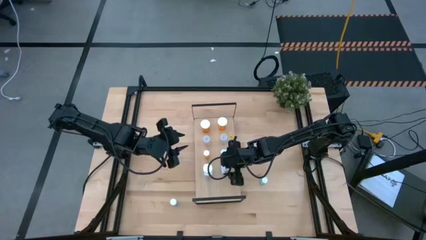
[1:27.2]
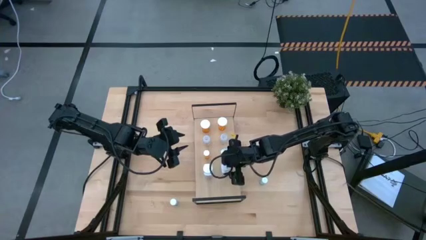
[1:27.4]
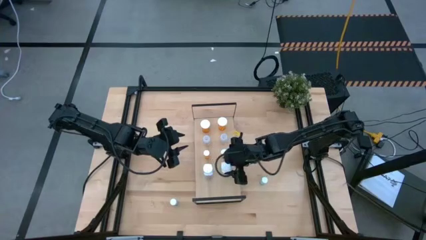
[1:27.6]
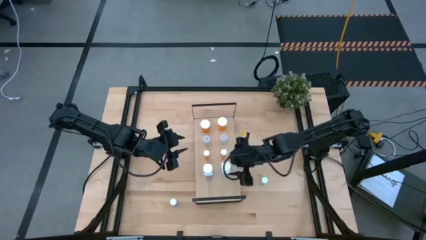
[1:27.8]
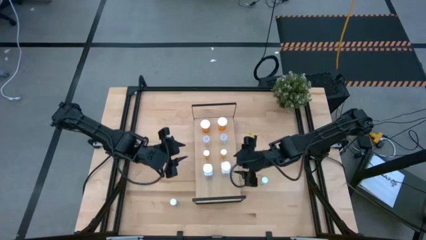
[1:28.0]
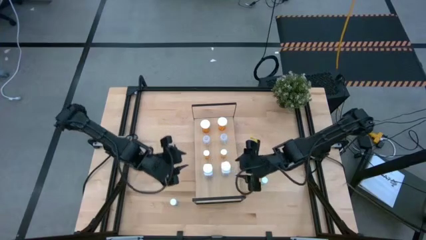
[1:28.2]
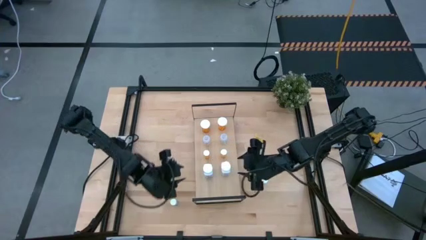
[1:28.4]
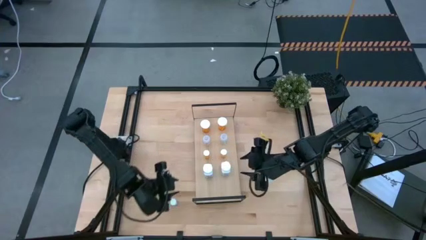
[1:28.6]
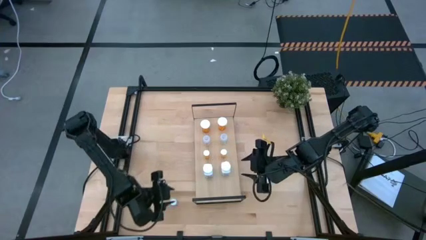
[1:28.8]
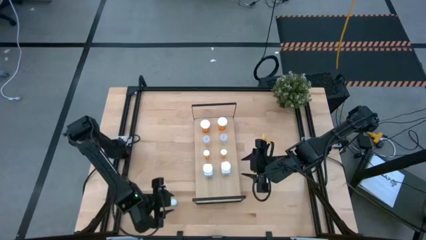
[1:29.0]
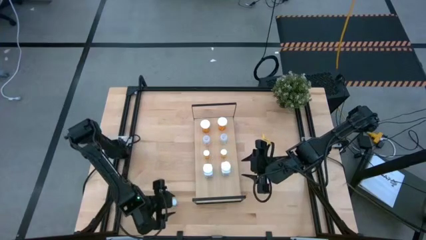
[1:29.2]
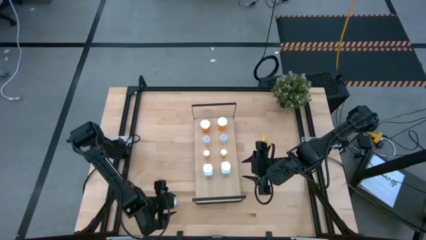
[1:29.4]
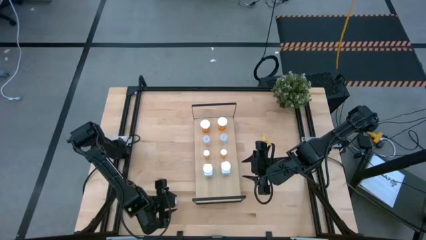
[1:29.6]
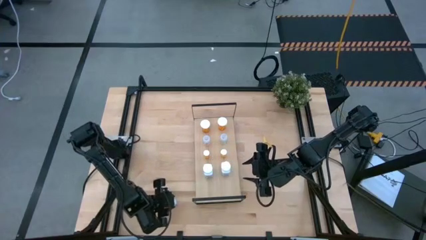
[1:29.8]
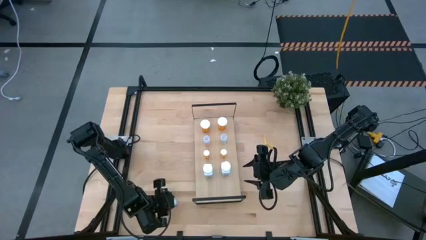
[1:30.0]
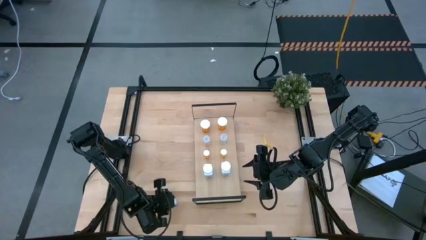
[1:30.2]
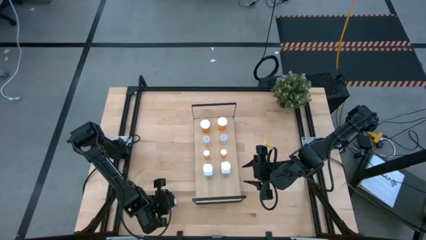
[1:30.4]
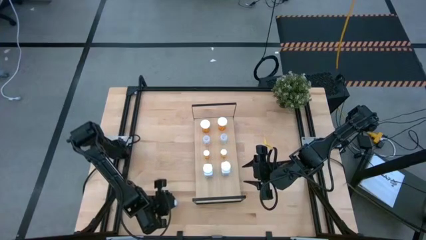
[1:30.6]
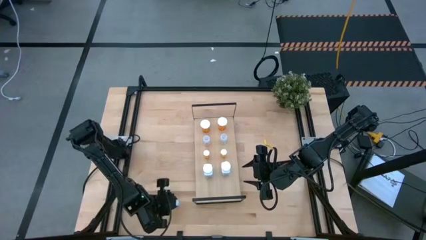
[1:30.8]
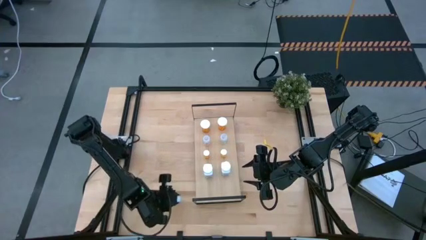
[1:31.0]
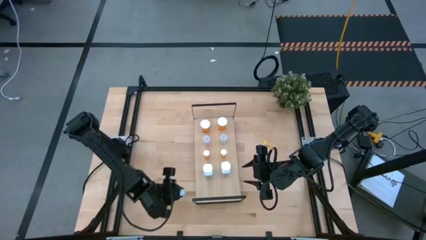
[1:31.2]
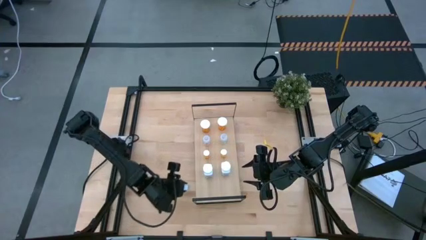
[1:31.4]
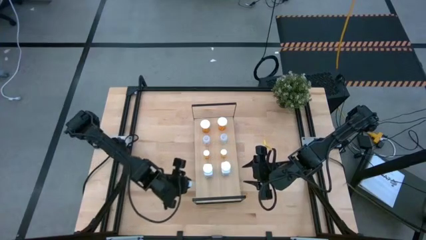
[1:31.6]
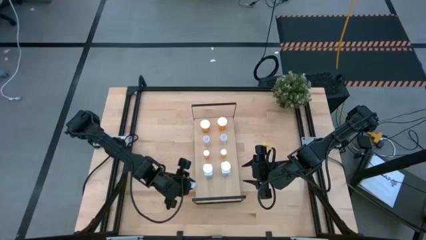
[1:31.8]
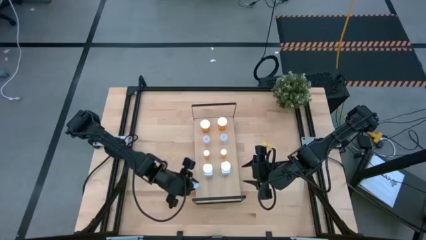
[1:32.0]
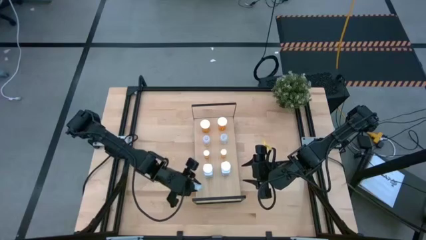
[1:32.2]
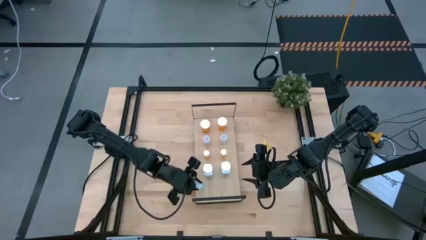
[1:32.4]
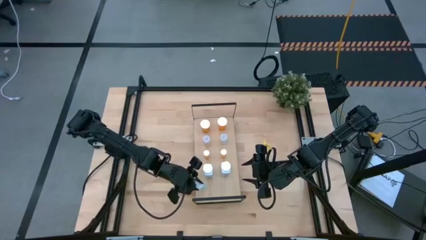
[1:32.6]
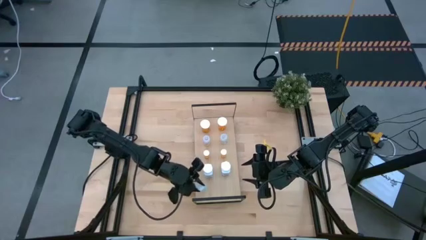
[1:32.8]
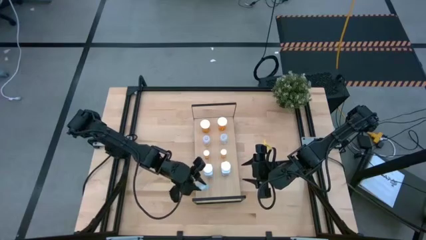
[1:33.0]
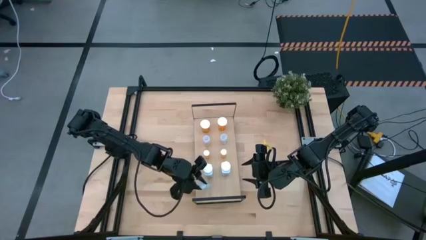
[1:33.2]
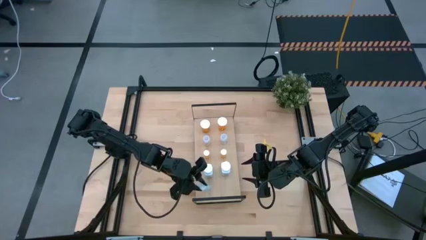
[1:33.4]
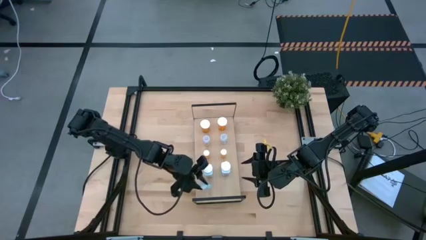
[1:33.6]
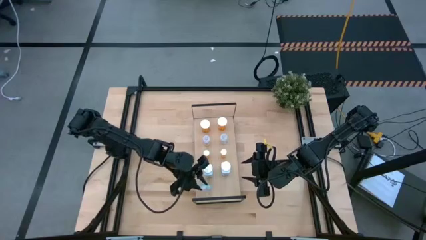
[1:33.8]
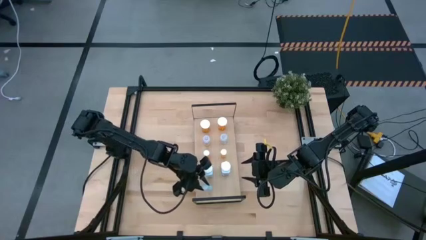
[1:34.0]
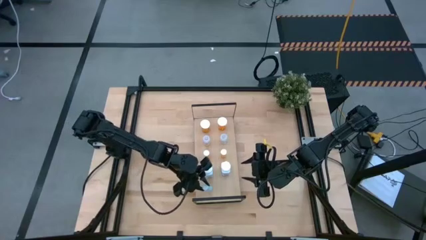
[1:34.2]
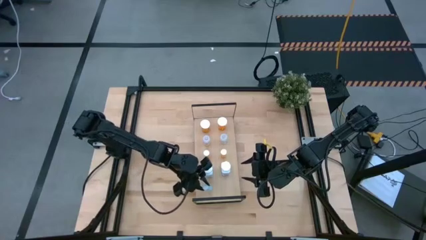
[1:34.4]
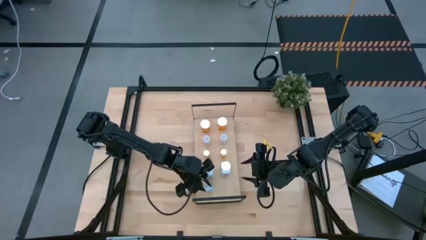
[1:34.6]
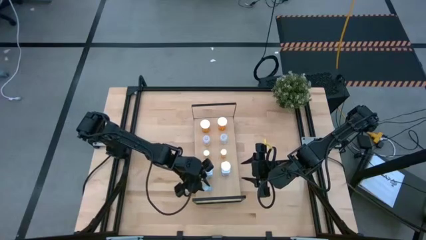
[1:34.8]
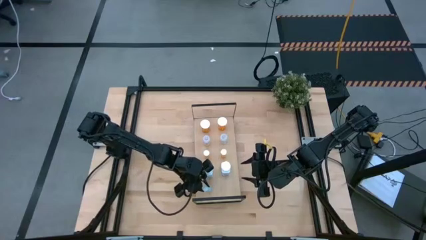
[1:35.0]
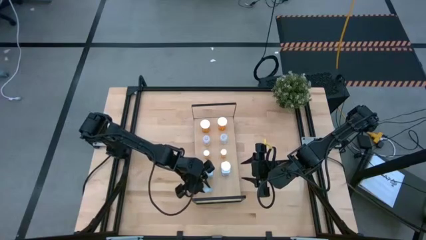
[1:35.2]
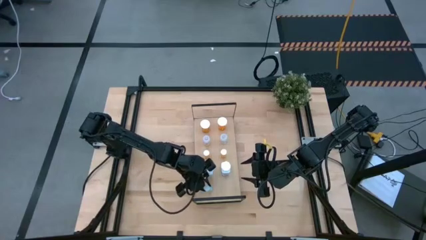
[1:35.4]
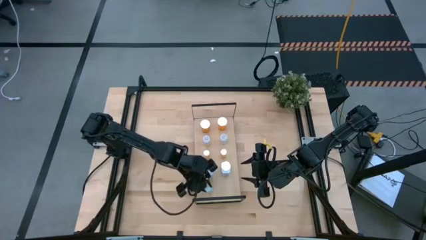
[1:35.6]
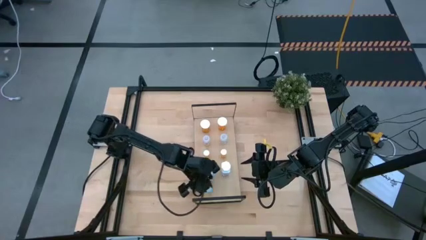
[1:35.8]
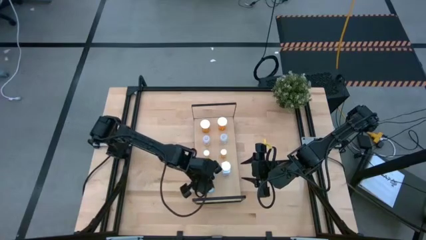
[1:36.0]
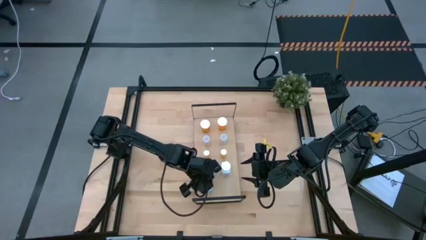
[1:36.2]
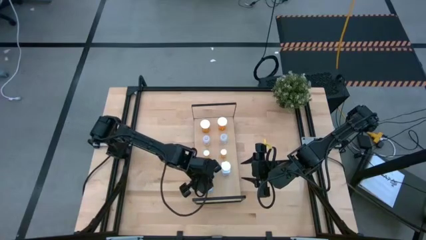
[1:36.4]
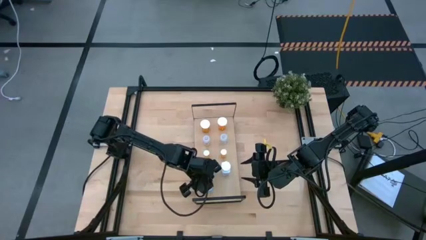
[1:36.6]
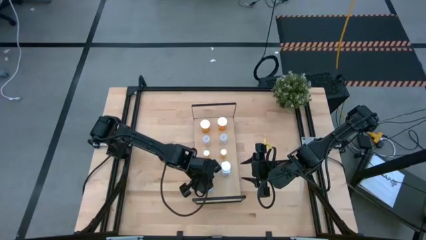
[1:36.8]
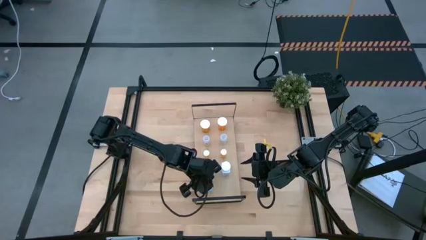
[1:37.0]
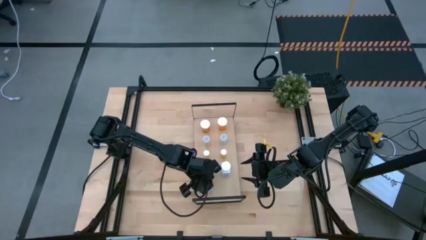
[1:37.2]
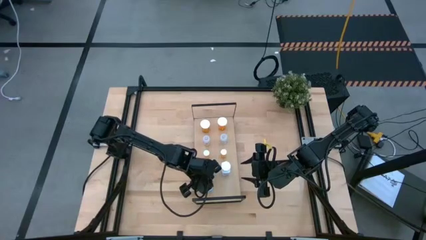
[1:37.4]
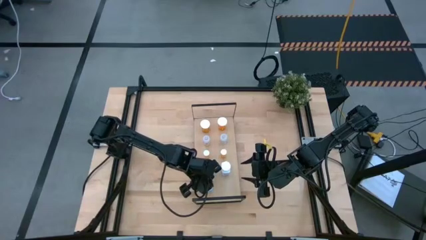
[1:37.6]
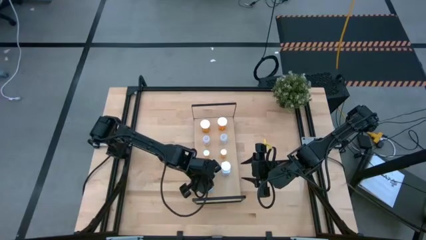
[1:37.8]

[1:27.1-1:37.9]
Task: Pick and place medicine bottles onto shelf by color
Put the left blue medicine bottle on the shelf

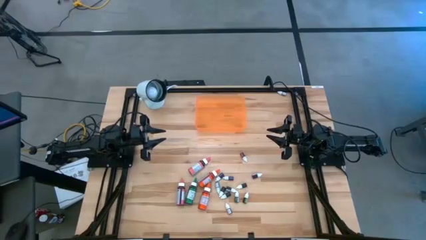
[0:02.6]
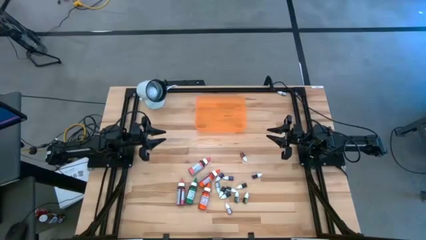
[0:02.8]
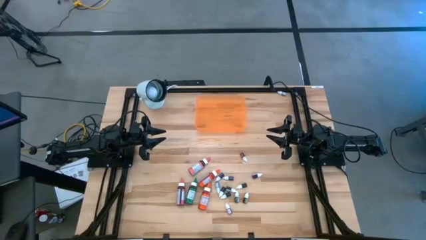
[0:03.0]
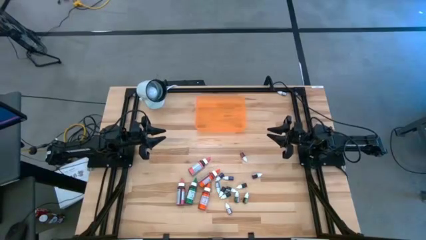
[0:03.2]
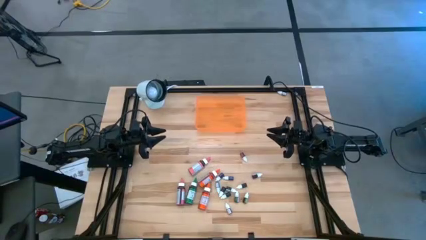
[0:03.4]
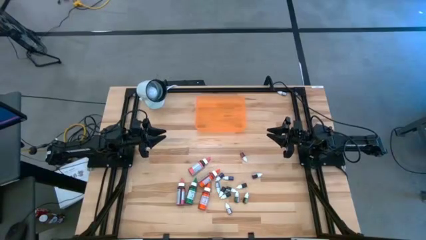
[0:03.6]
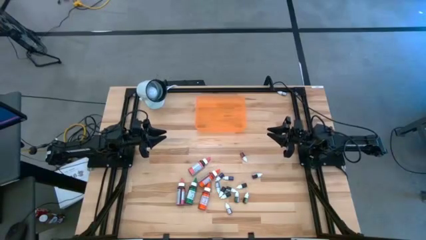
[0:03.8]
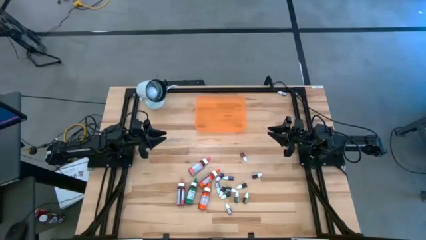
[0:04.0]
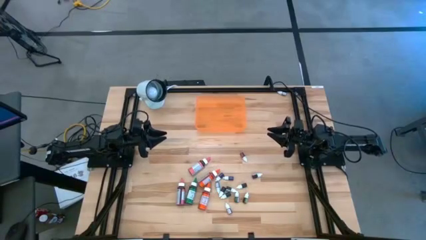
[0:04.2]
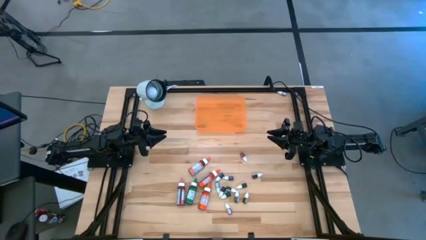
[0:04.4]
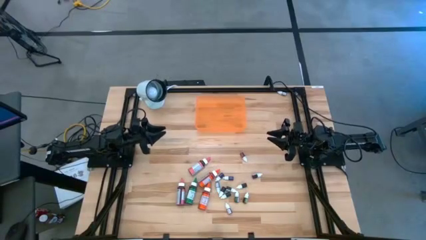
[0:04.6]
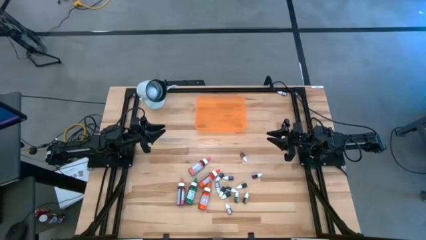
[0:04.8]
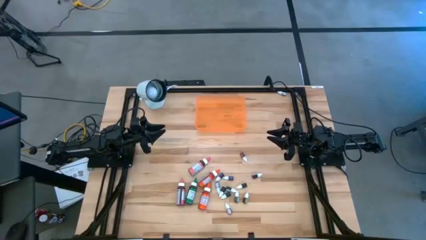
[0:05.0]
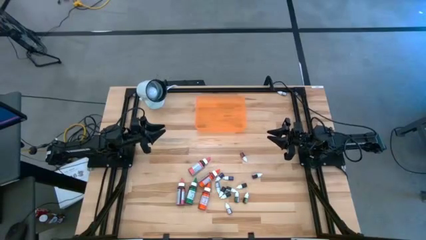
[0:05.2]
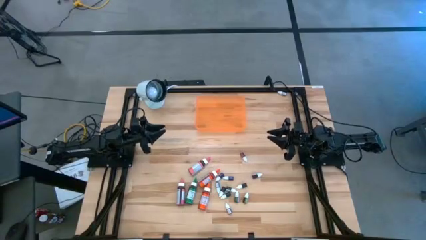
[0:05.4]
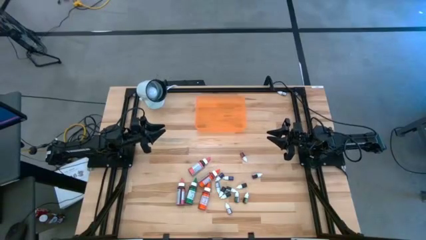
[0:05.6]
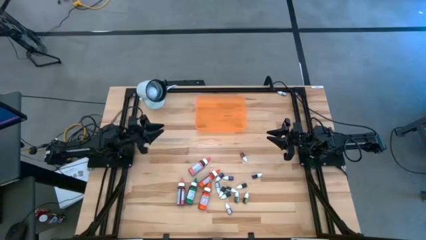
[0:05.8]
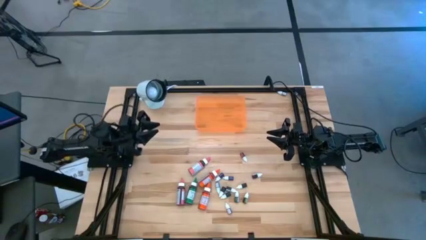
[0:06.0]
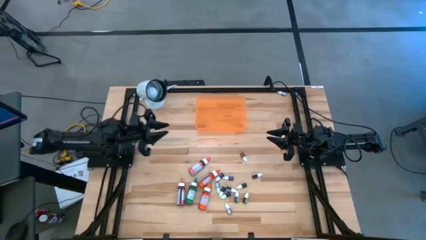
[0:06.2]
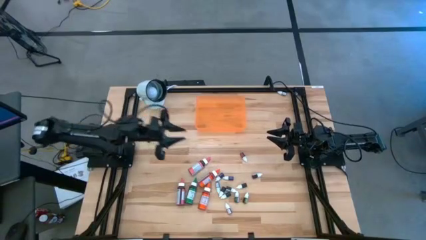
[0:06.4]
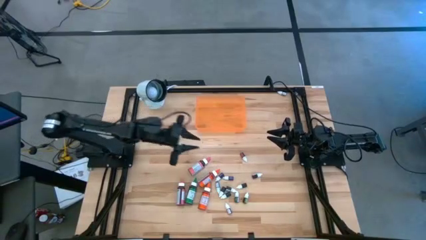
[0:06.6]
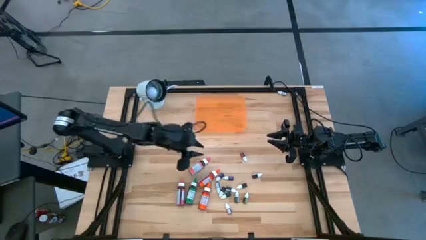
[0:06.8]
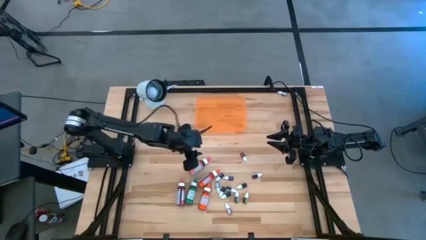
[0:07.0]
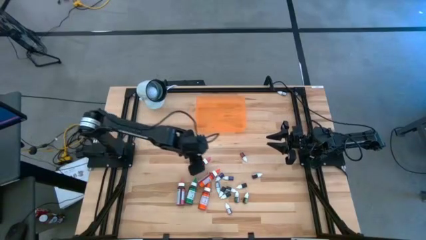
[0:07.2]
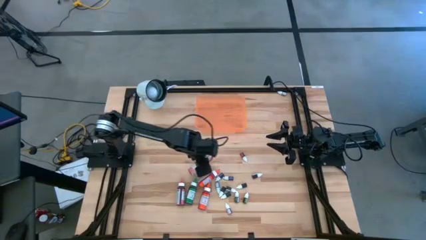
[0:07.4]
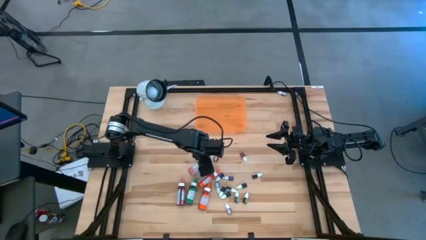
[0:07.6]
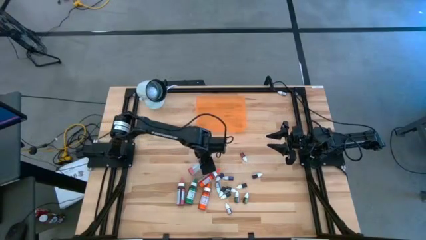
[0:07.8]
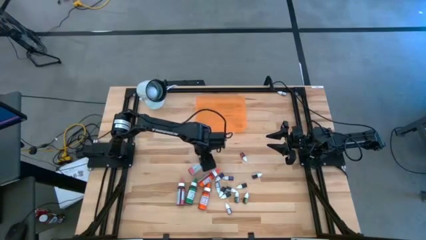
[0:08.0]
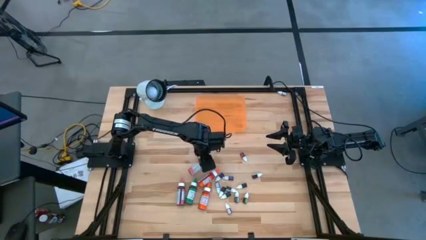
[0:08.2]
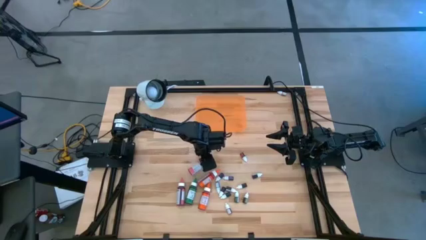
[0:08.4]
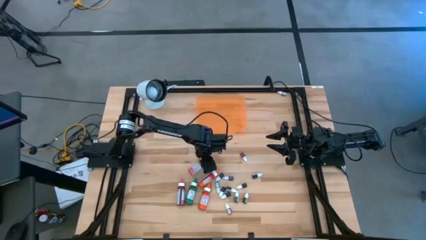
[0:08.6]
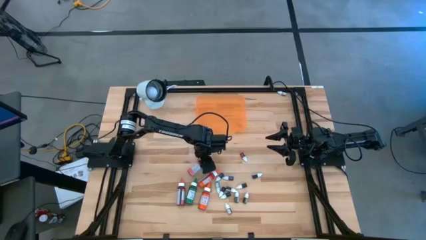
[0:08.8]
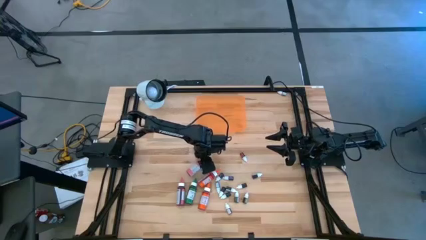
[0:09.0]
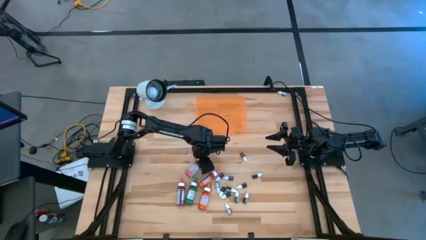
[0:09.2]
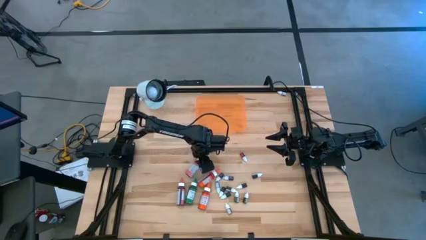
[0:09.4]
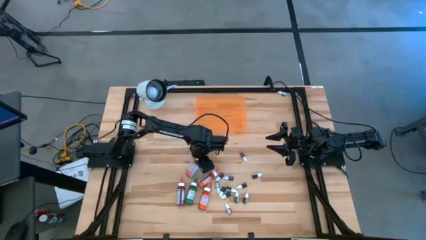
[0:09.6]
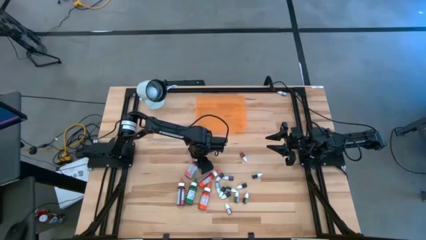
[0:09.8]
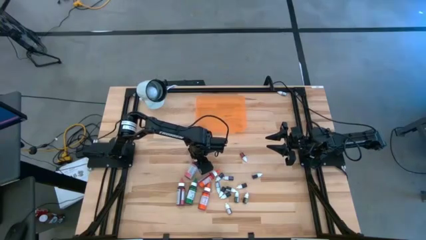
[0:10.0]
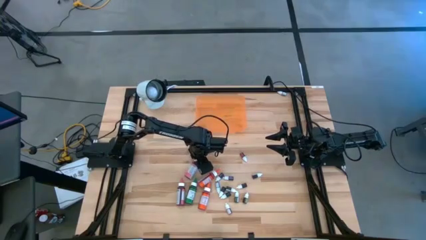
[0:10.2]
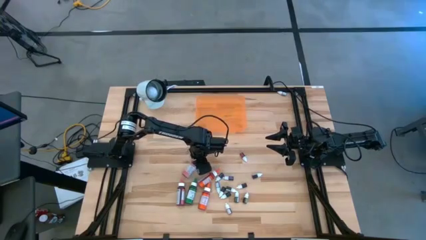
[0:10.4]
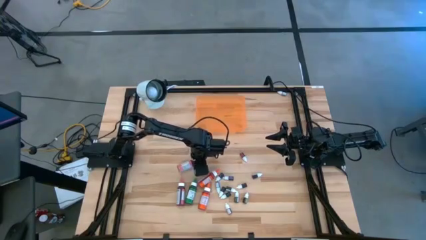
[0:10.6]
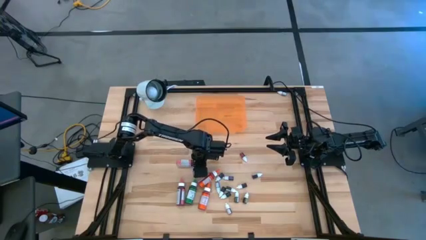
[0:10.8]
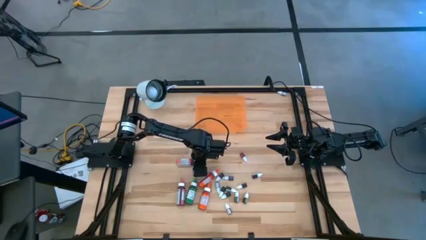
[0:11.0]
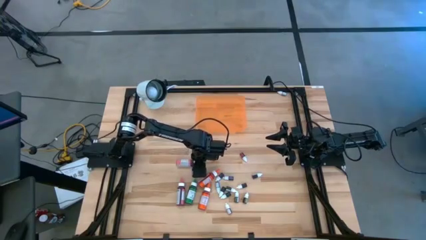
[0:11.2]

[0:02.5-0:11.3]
Task: Pick & Place food coloring
Put the large pink food coloring bottle into the orange bin
